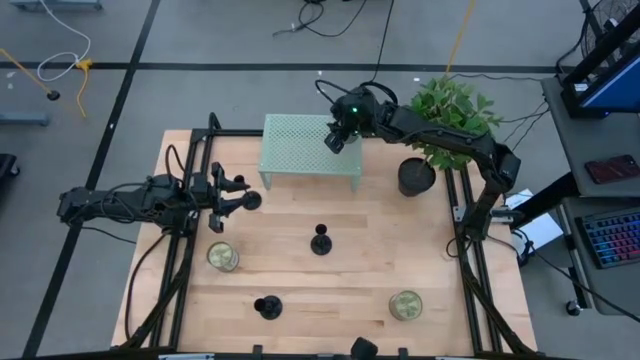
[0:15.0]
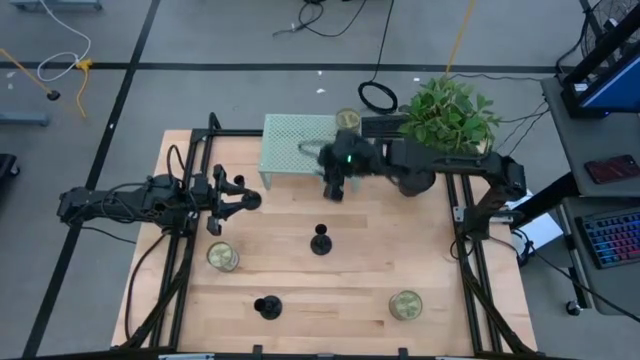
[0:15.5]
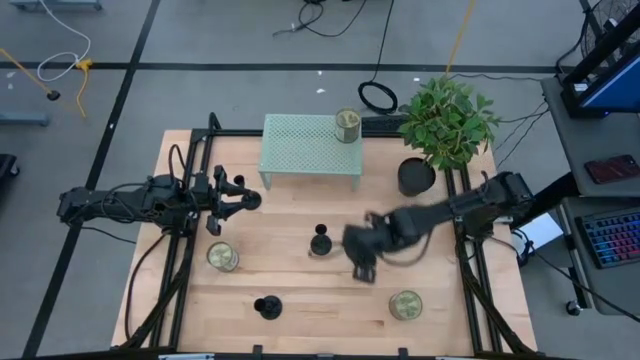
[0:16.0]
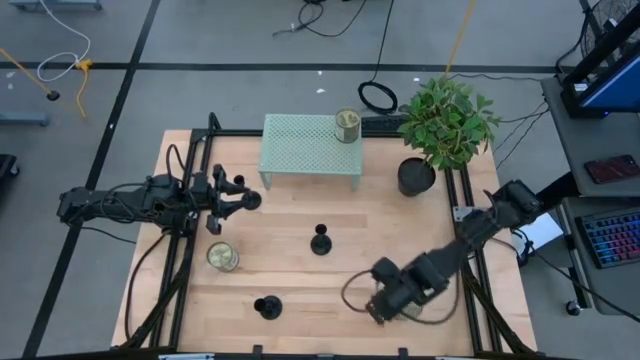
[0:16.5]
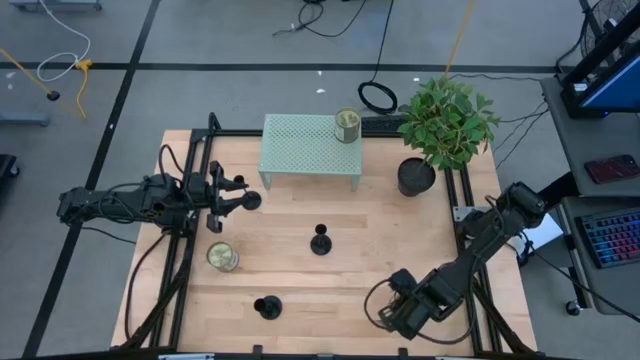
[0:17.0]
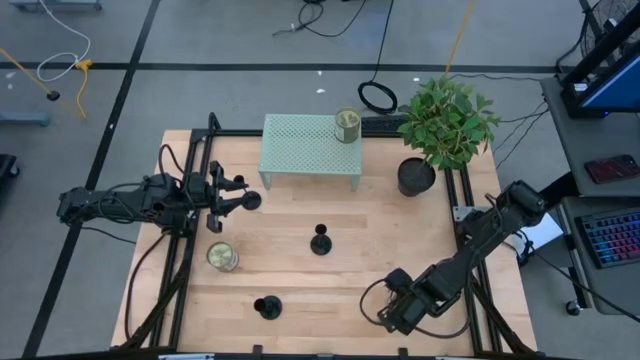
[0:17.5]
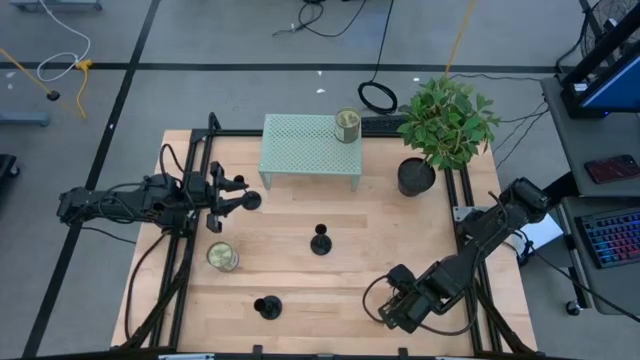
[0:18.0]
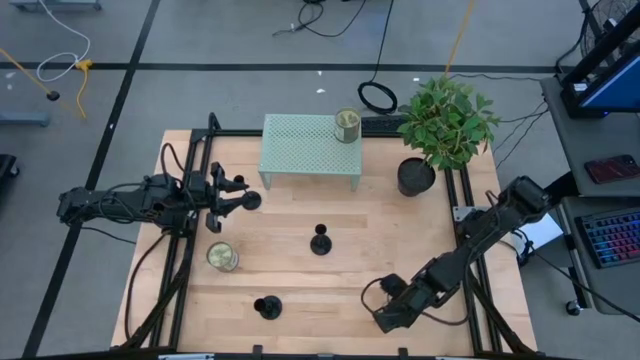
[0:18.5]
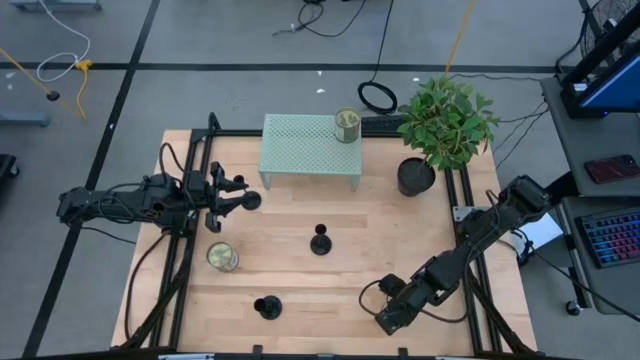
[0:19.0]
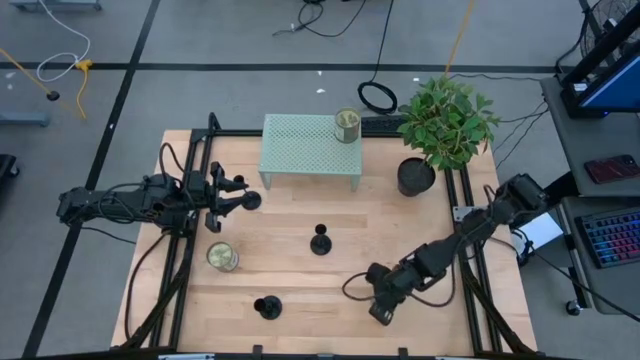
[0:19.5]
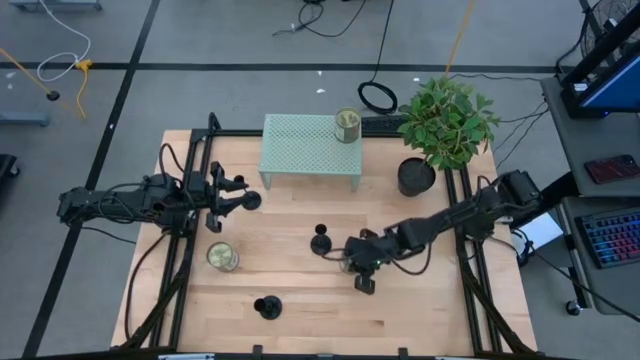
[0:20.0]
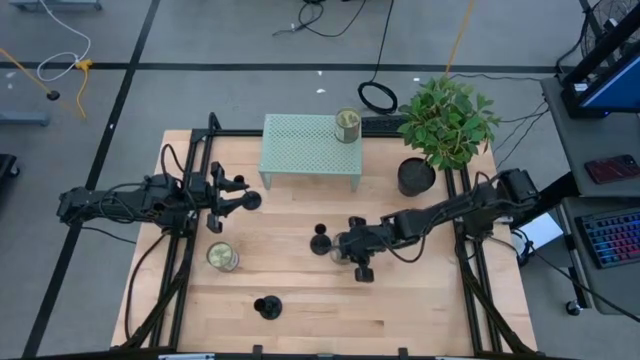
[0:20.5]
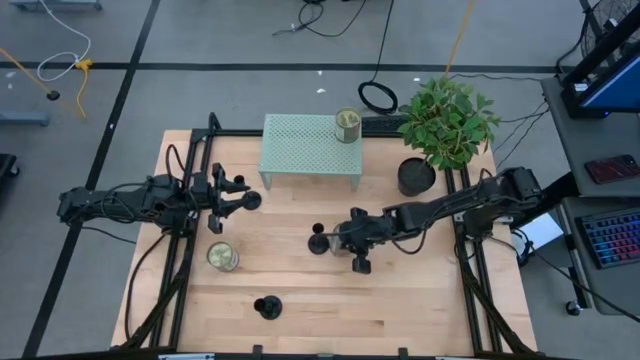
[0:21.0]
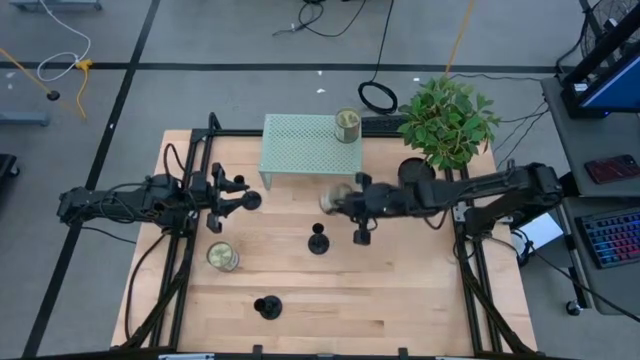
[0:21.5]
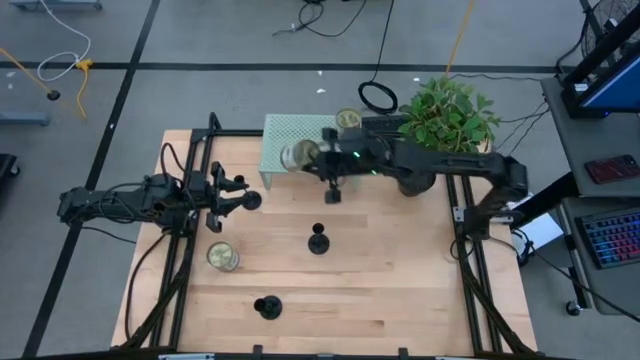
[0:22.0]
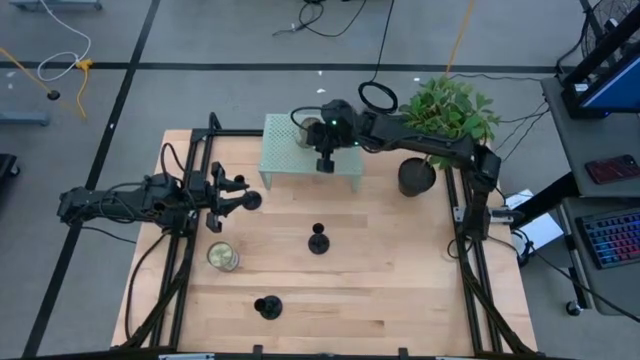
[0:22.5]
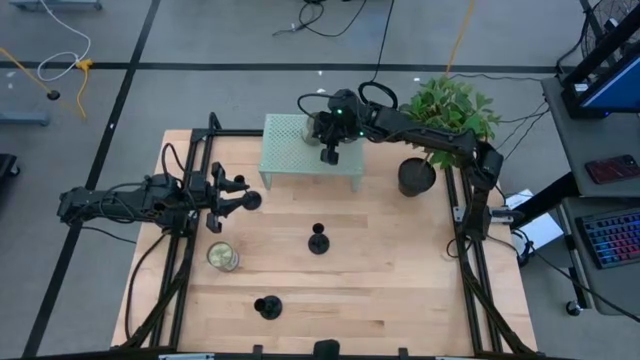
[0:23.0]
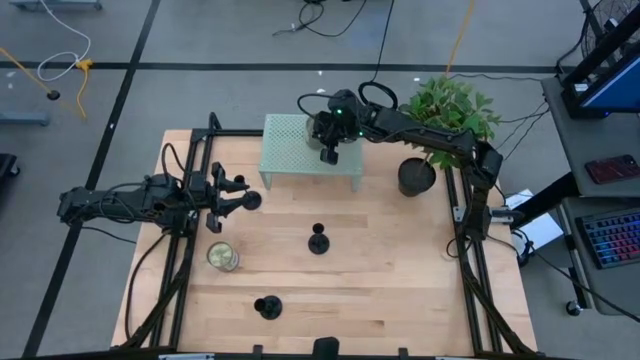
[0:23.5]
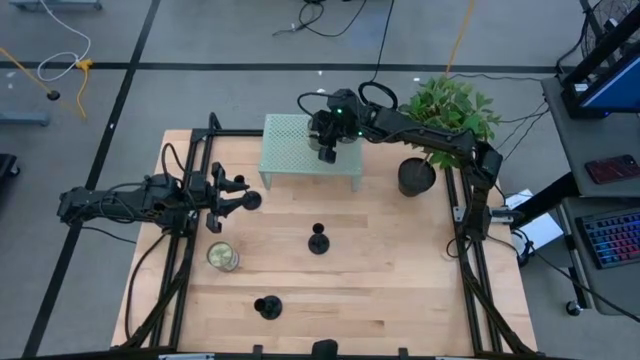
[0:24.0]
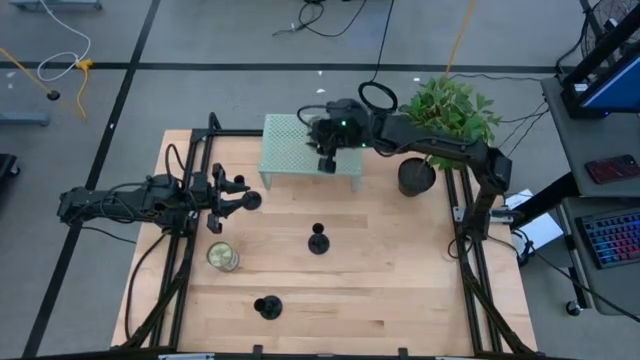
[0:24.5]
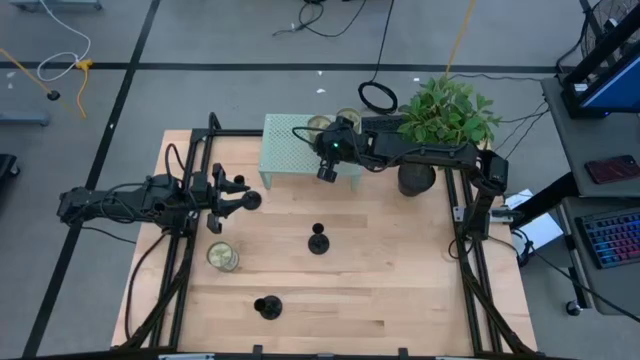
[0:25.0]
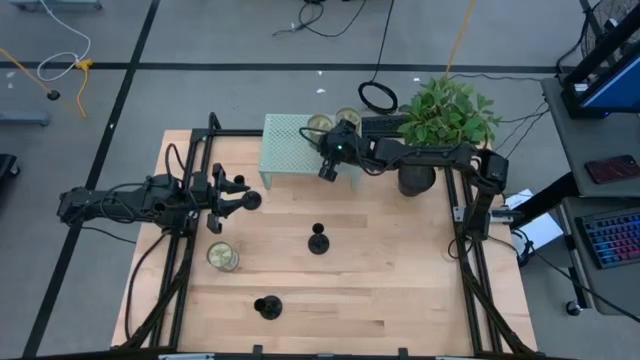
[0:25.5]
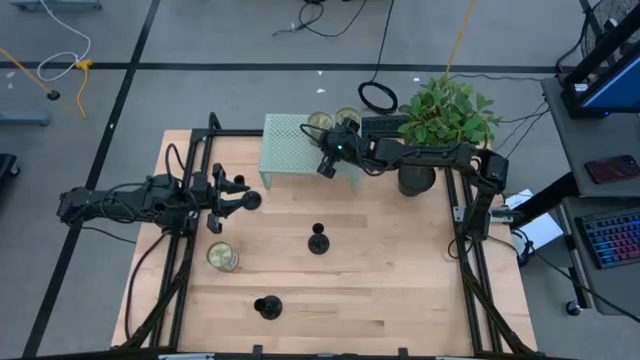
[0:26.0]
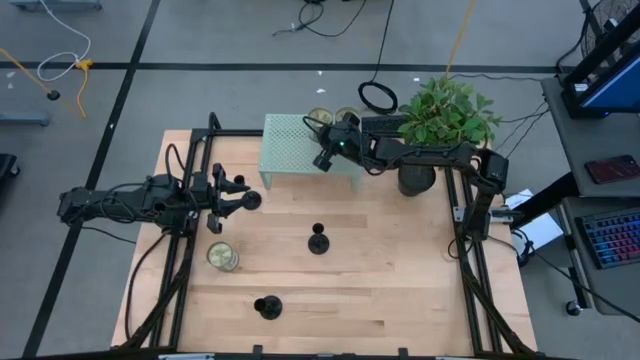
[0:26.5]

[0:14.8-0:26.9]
Task: Pick & Place candle stick holders
Put the right scented candle on the shelf

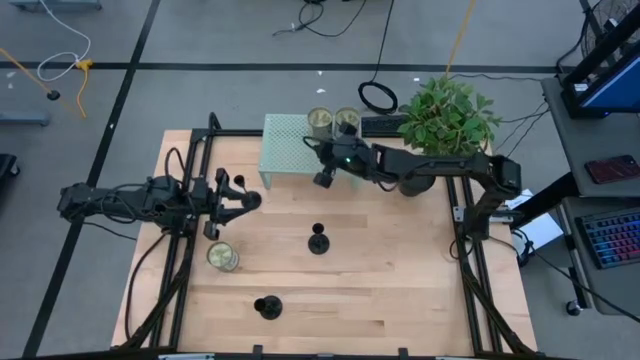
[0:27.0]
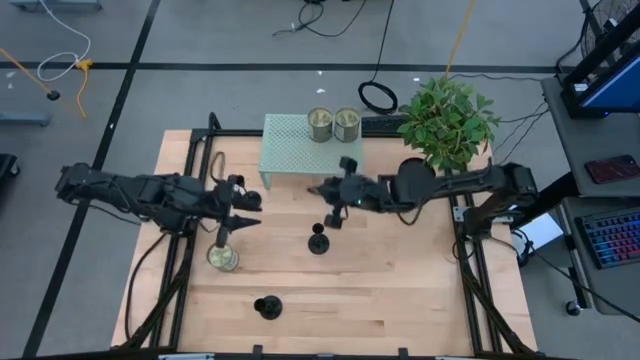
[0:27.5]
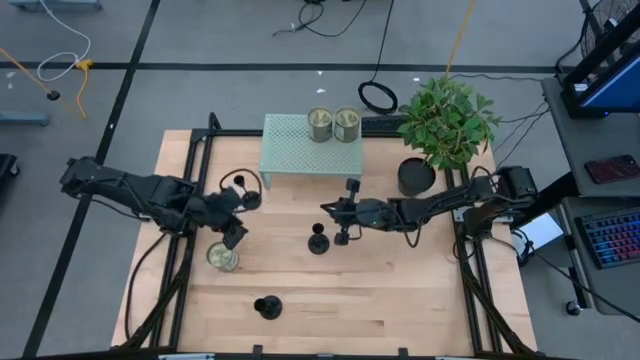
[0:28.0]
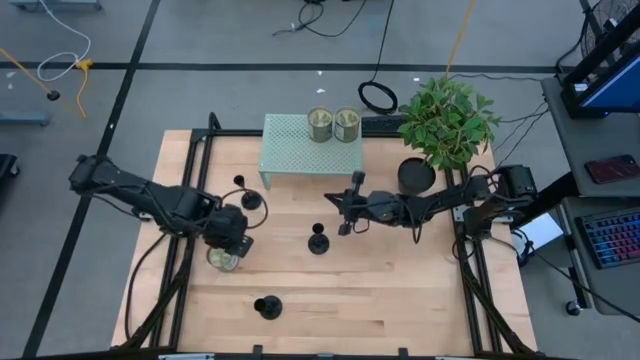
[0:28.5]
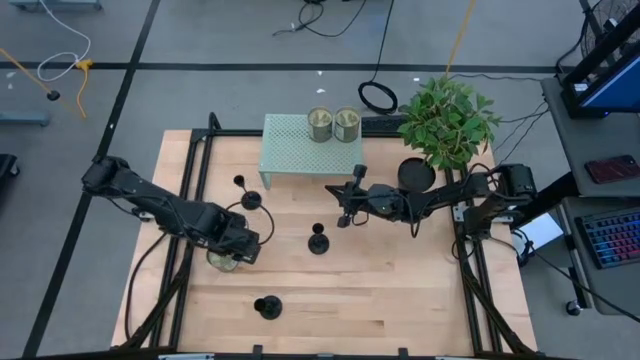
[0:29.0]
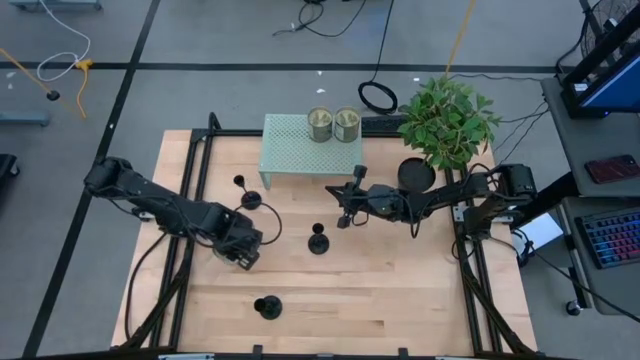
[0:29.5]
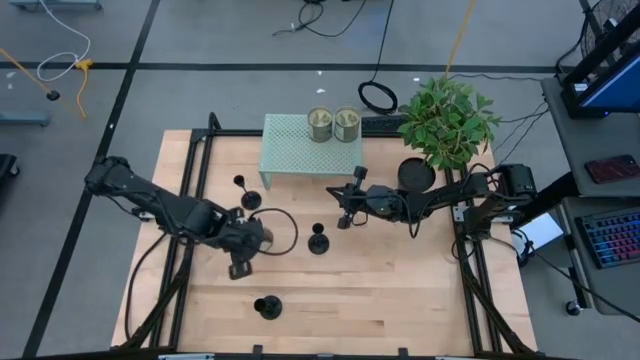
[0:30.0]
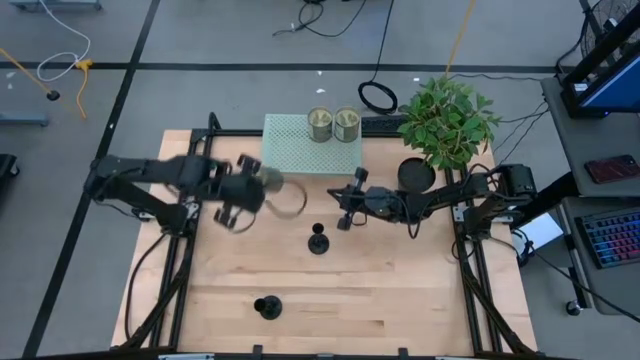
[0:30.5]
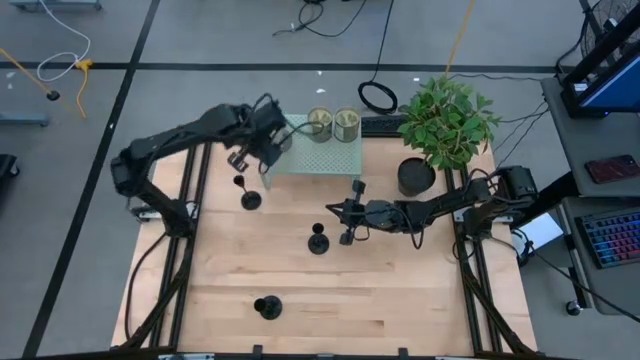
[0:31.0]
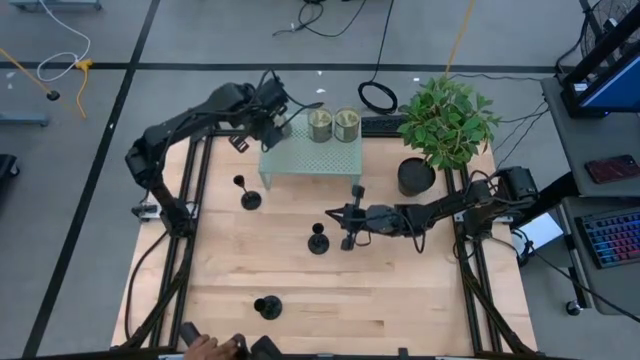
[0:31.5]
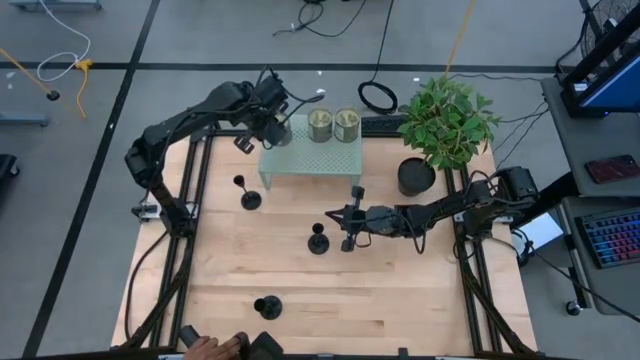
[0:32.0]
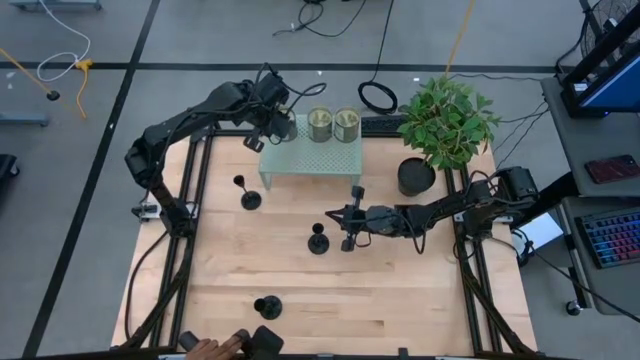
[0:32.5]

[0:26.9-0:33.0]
Put the scented candle on the shelf

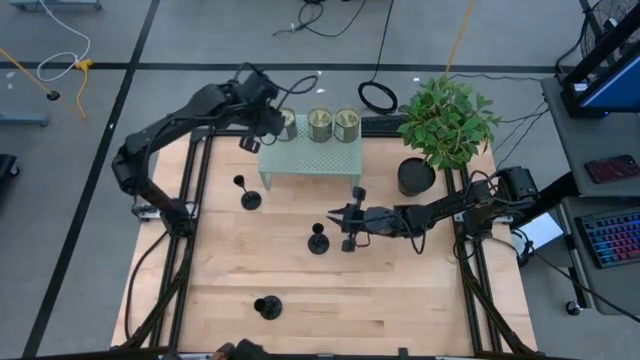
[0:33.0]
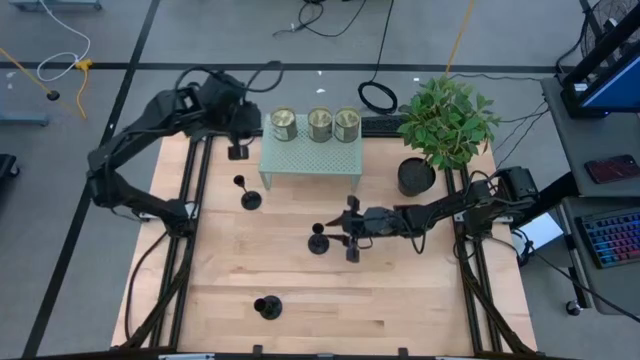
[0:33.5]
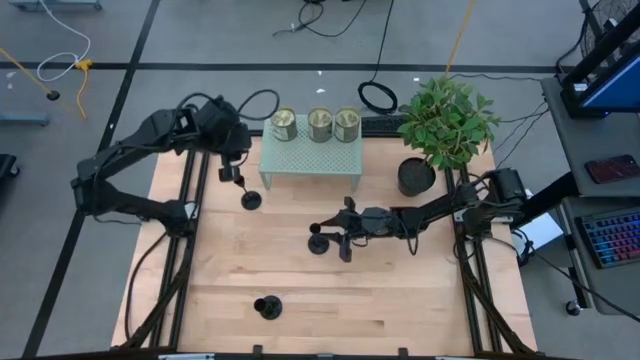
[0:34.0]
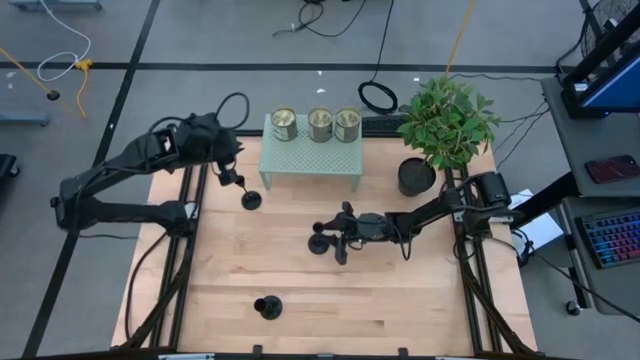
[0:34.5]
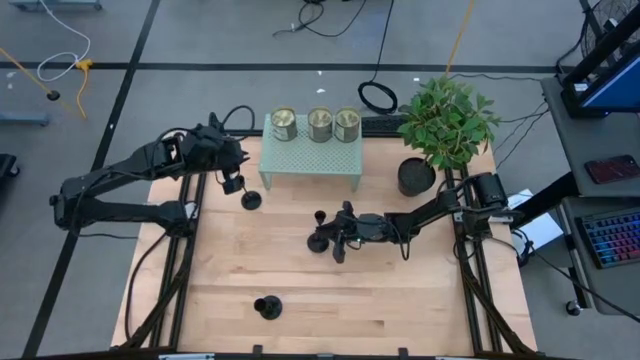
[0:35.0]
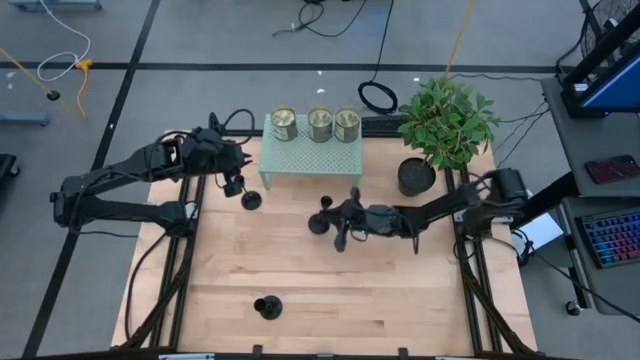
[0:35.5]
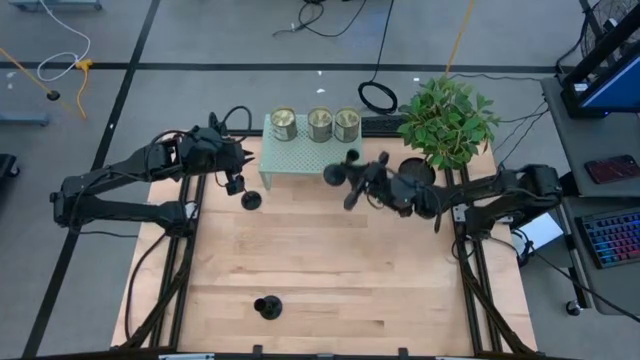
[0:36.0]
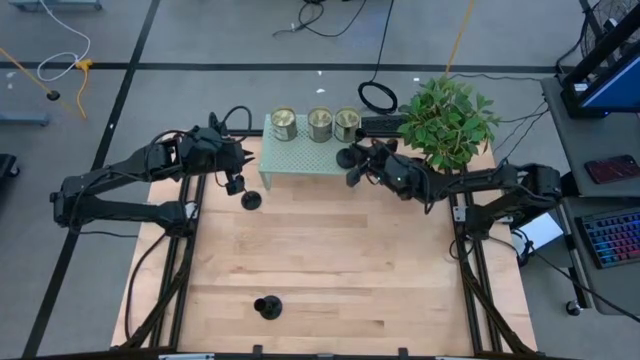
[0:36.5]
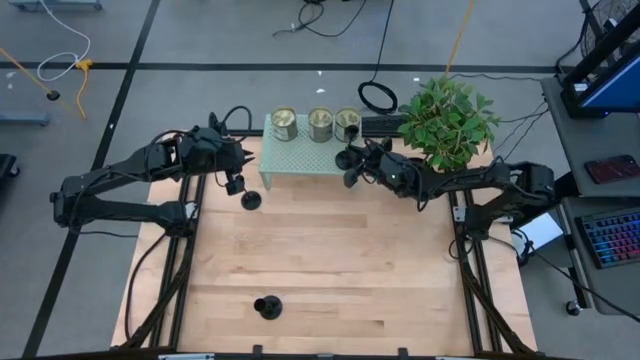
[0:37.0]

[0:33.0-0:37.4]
Put the middle candle holder on the shelf
